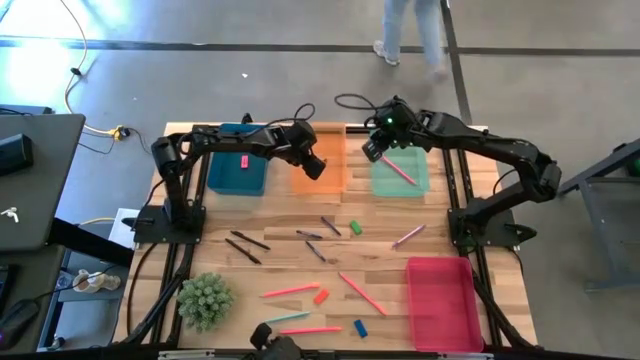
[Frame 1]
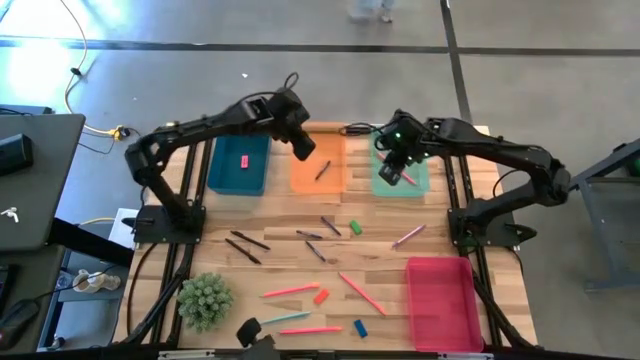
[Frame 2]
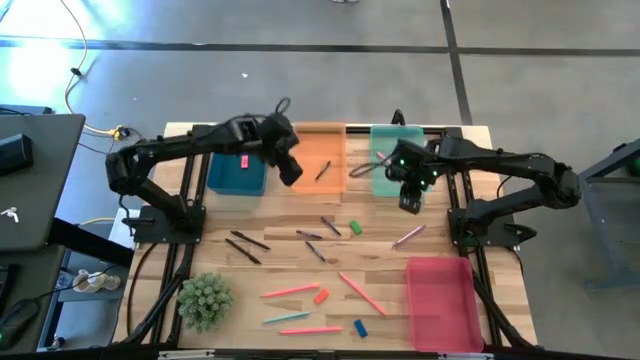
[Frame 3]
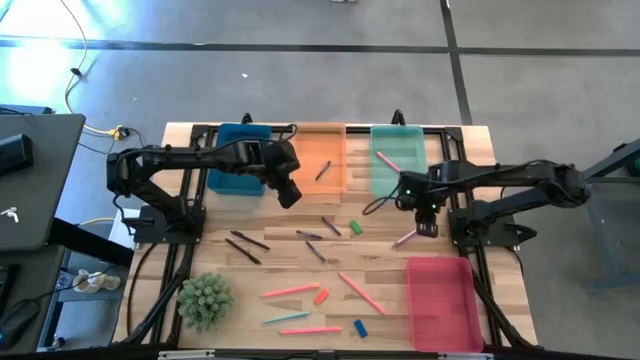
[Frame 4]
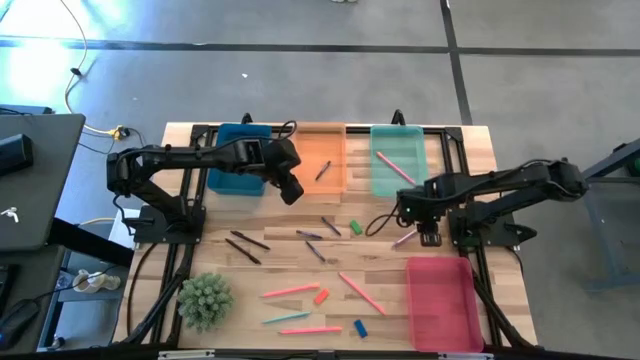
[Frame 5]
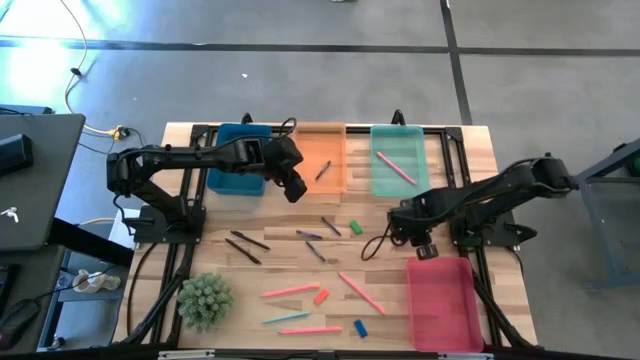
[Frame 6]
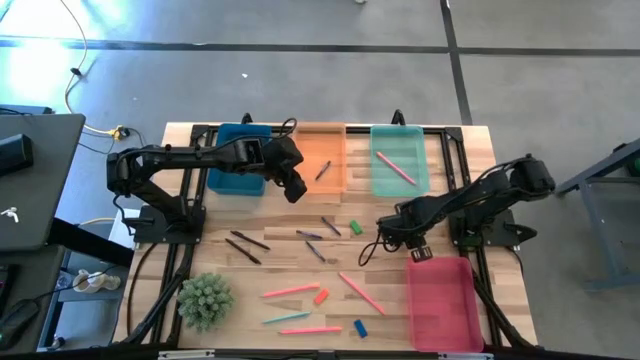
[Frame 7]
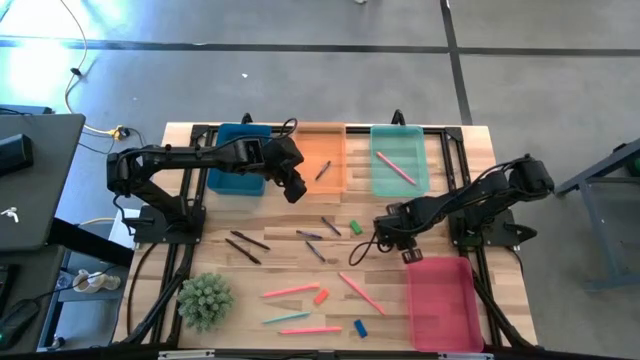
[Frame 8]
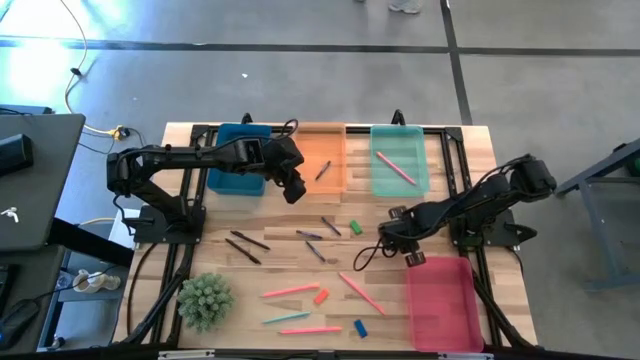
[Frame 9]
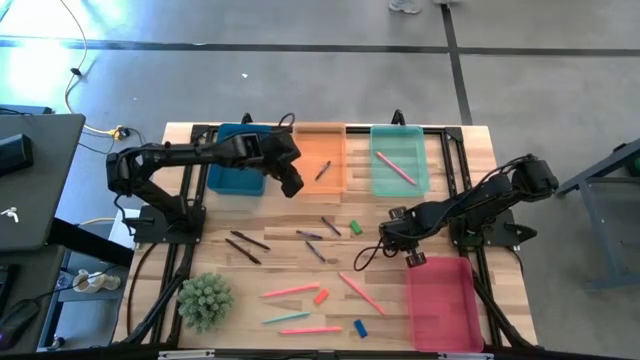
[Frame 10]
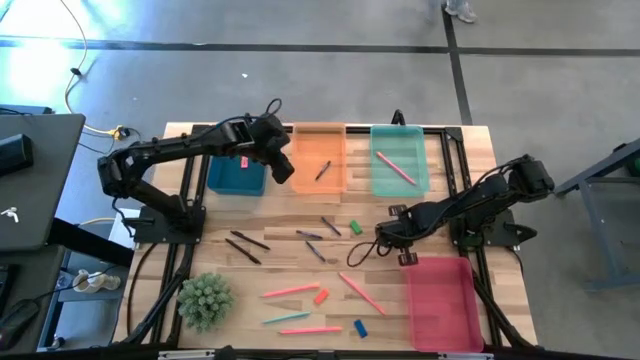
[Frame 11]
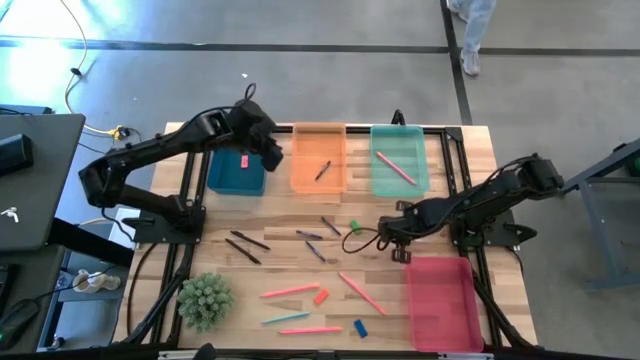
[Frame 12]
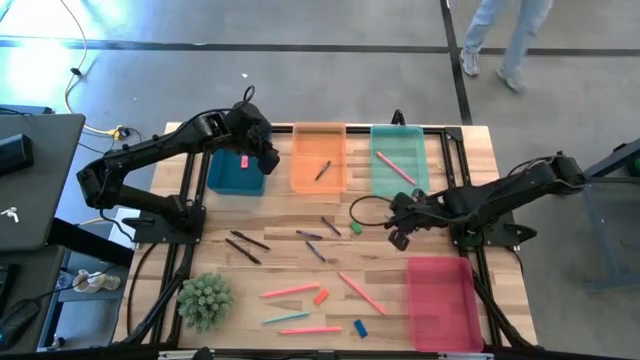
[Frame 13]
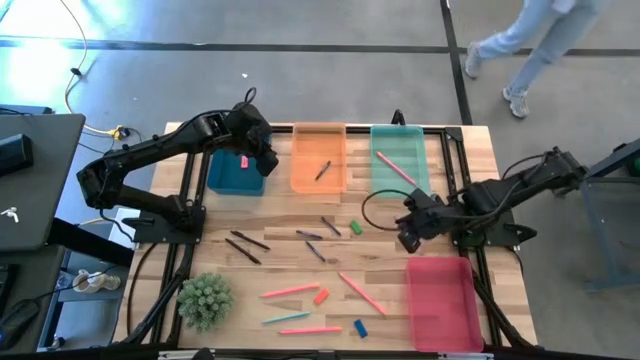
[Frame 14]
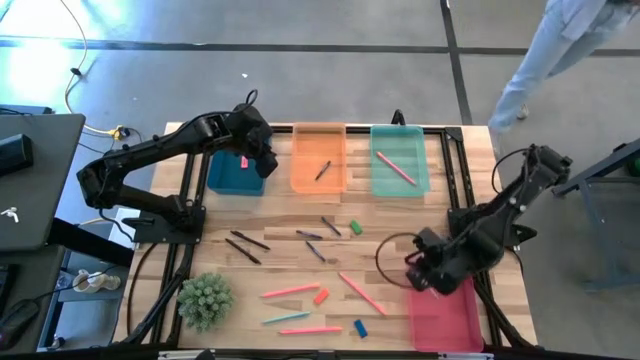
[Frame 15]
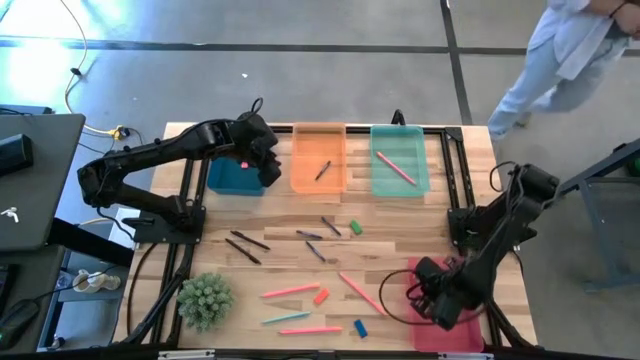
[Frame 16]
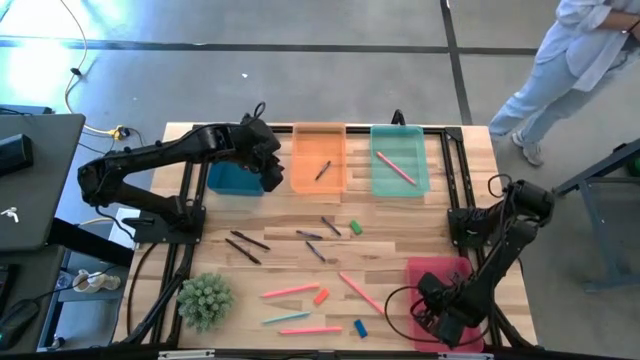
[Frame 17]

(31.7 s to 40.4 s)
Task: Sort crayons/erasers/pens/pencils in bins
Put the violet pen into the pink bin

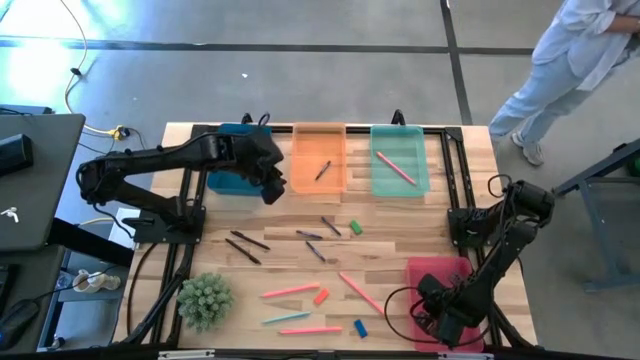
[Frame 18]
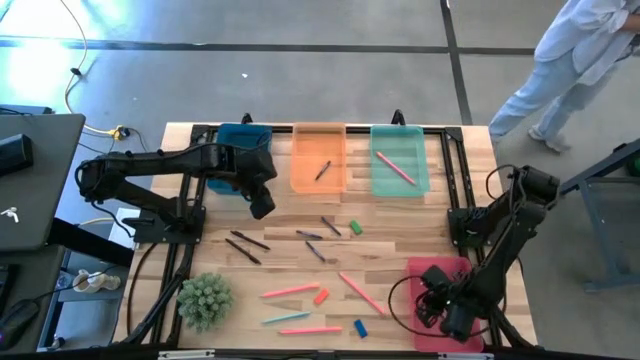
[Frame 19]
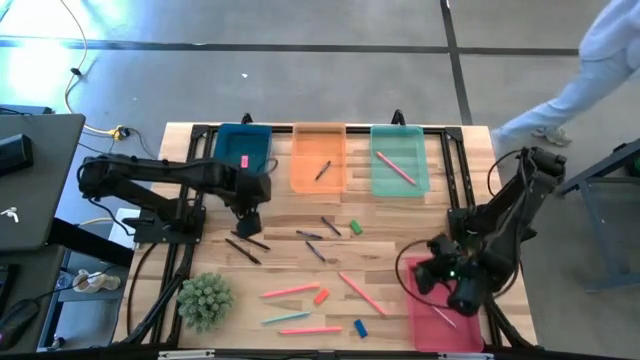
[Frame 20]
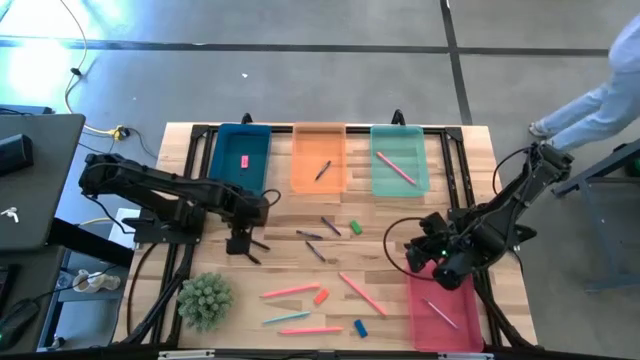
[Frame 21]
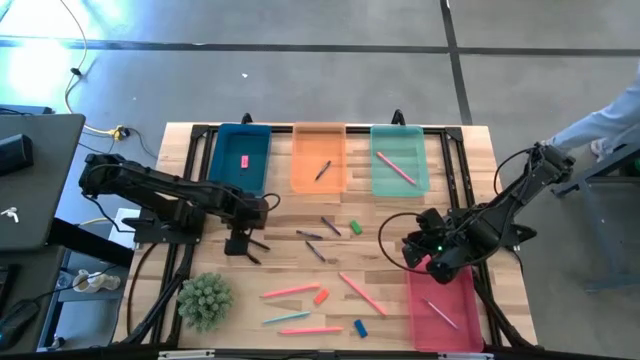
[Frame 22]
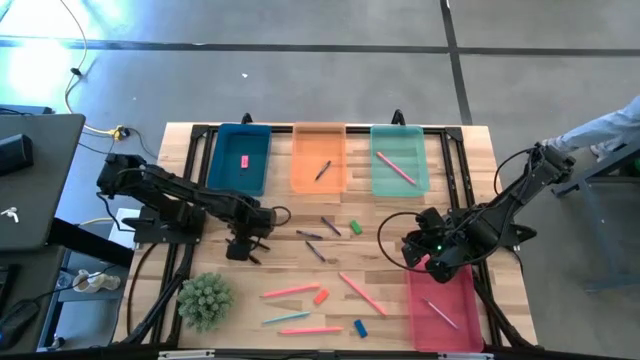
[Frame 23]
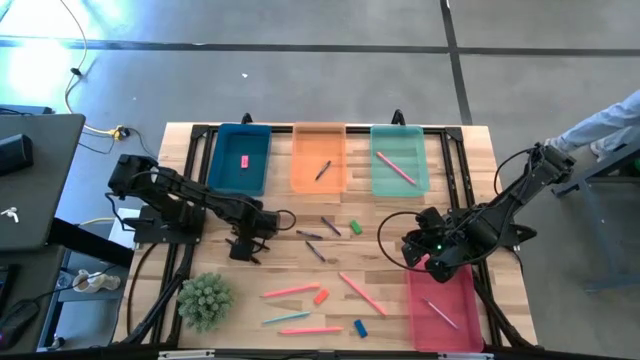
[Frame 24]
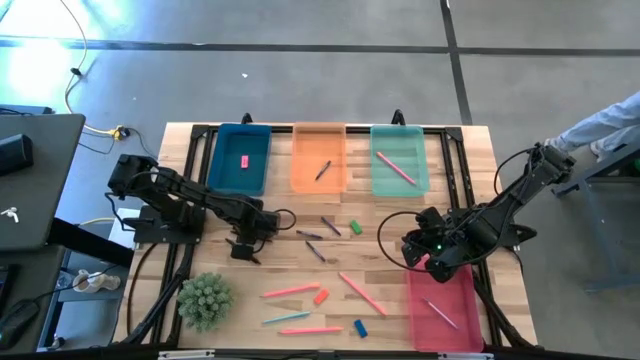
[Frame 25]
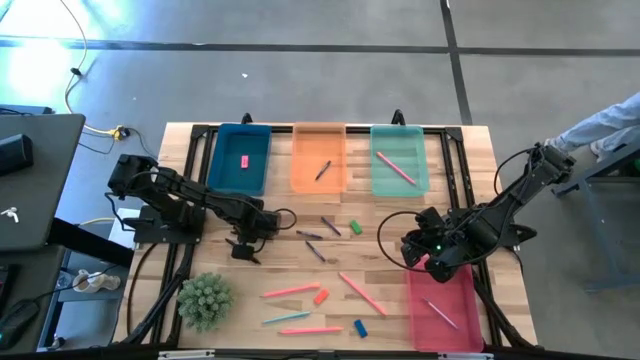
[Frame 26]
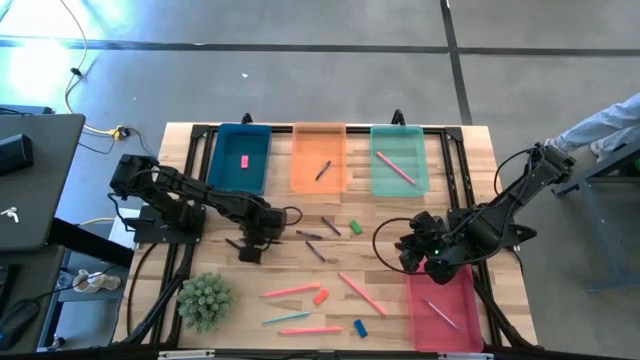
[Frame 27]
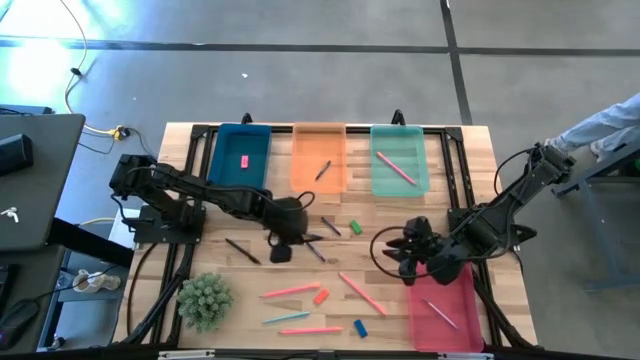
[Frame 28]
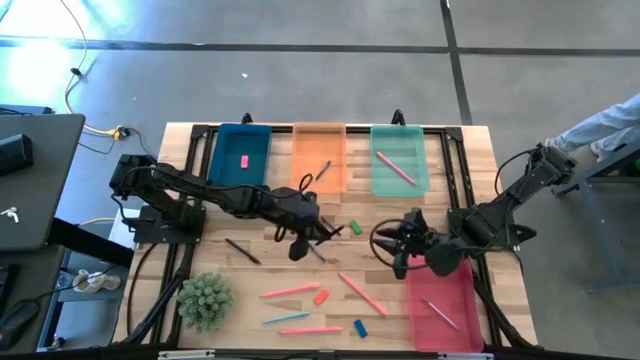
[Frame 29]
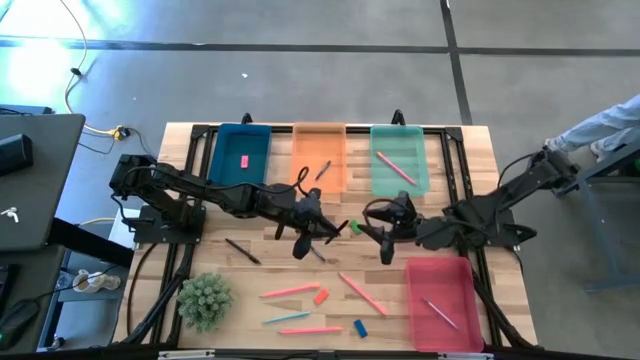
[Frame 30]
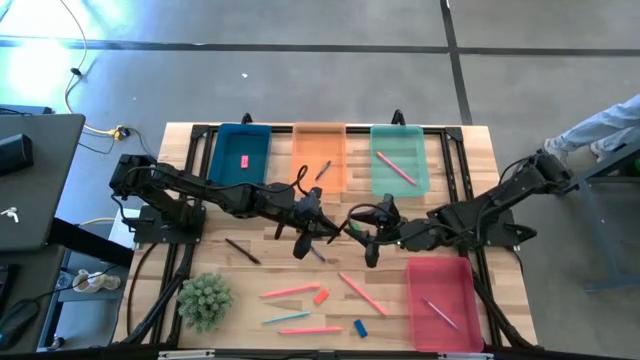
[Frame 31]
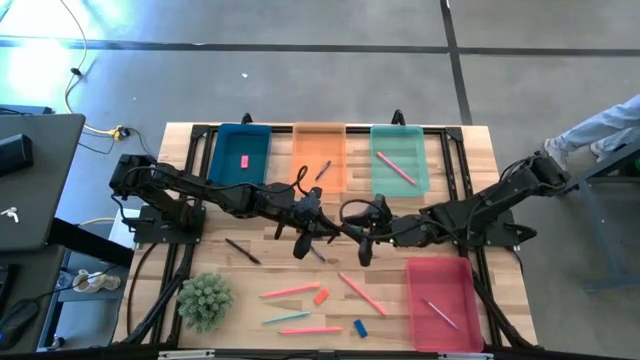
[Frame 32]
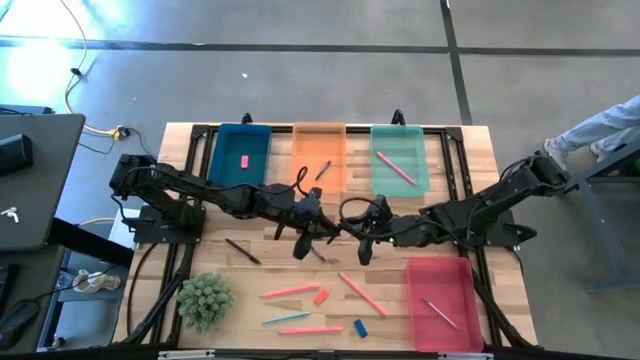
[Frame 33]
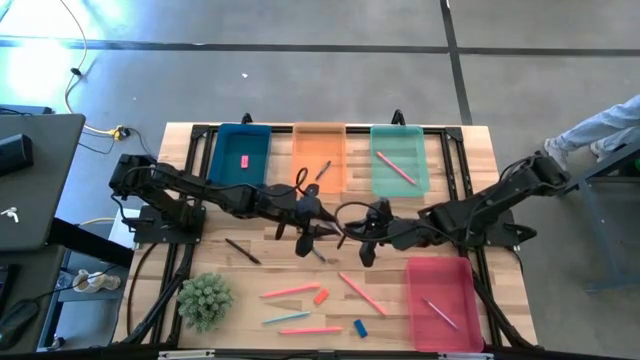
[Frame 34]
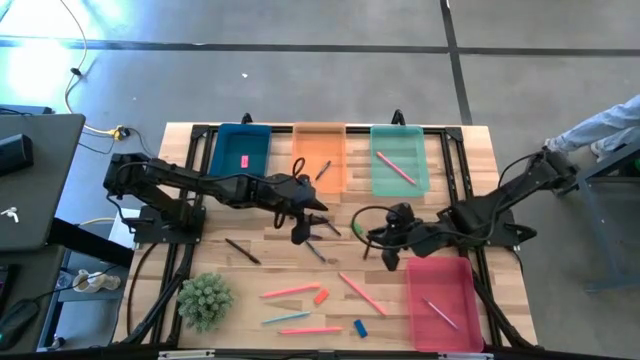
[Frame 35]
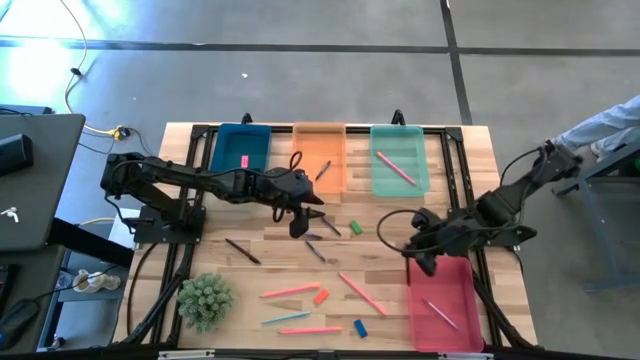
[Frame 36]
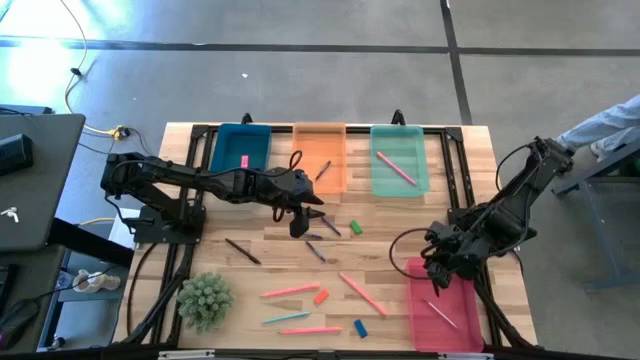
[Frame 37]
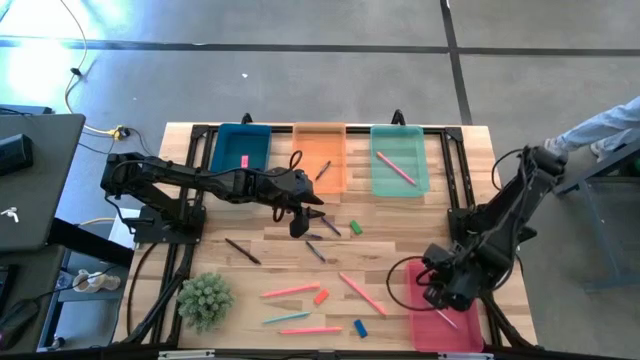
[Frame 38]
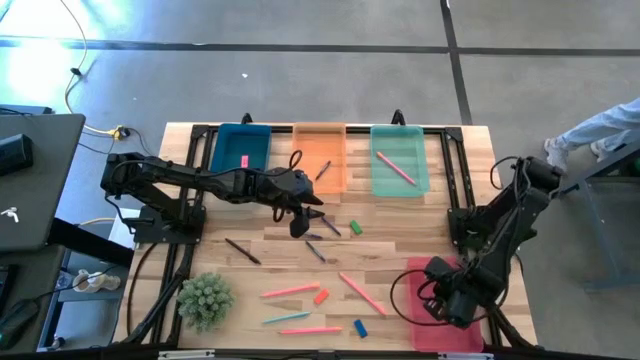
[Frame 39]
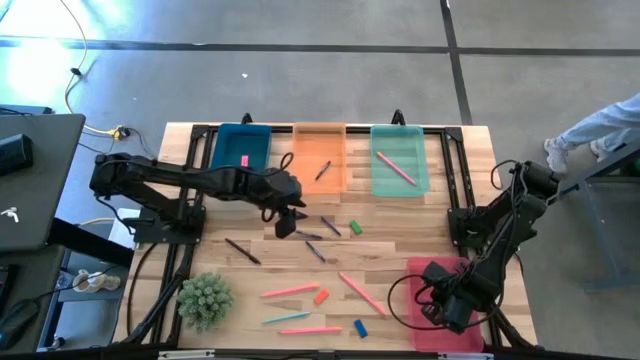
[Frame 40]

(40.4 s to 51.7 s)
Put the top black pen into the pink bin

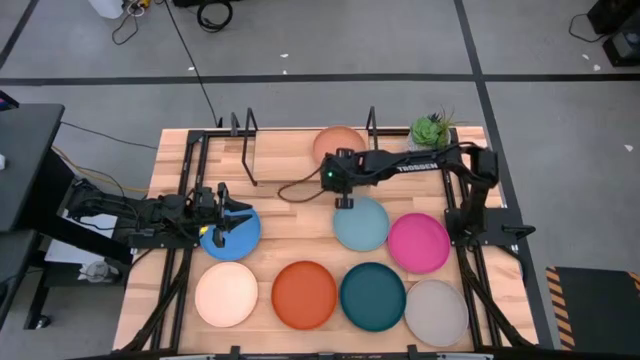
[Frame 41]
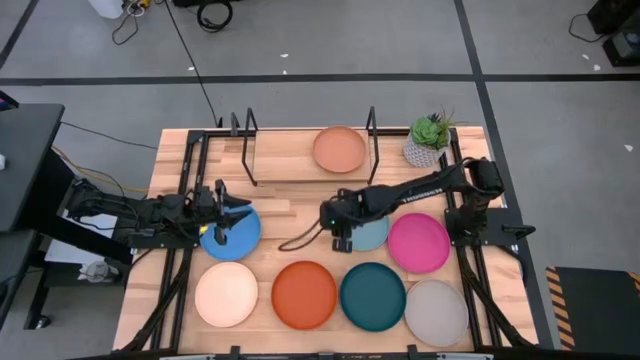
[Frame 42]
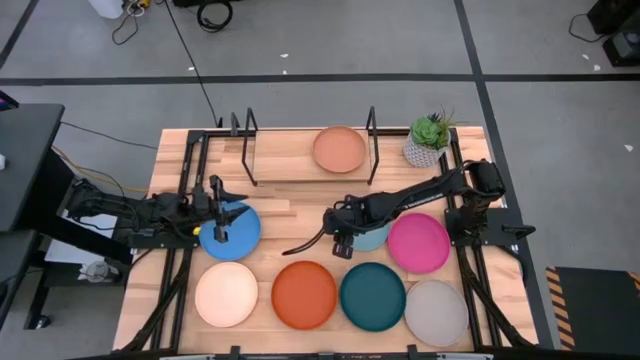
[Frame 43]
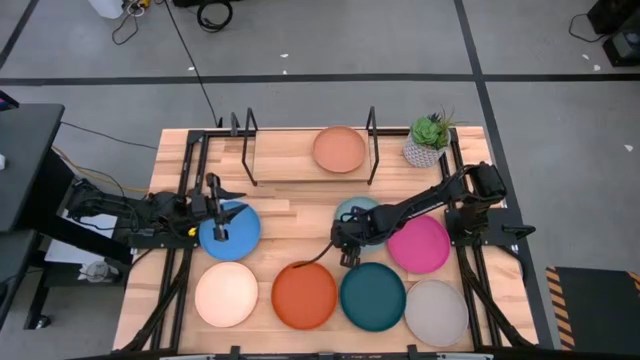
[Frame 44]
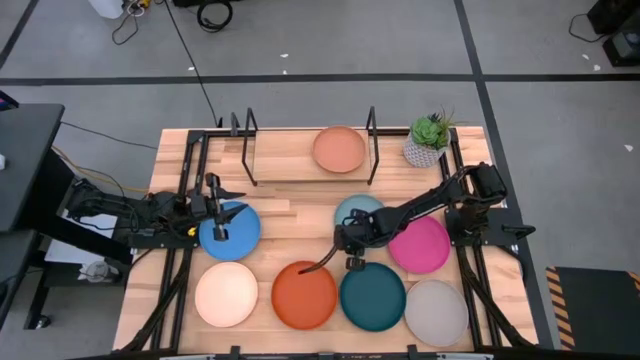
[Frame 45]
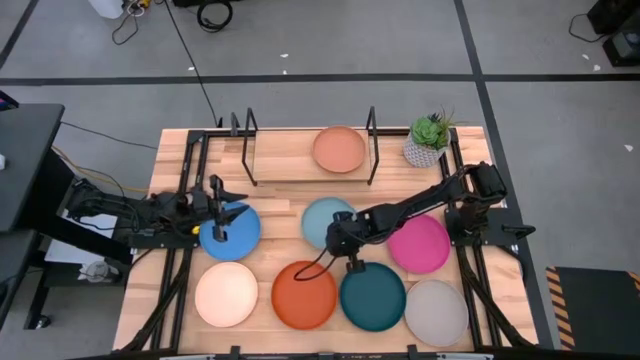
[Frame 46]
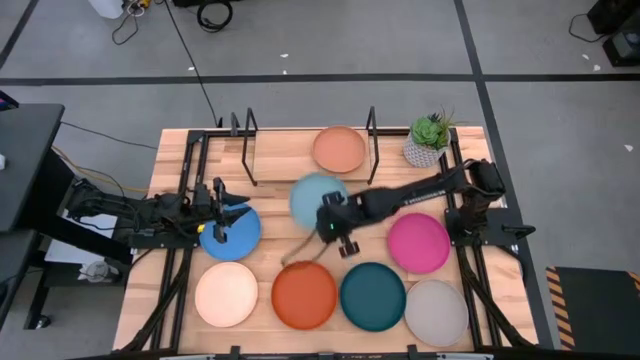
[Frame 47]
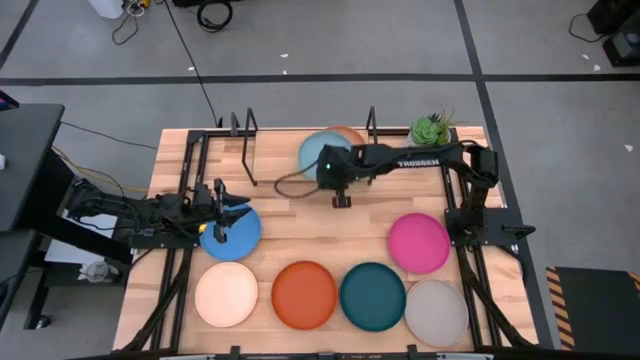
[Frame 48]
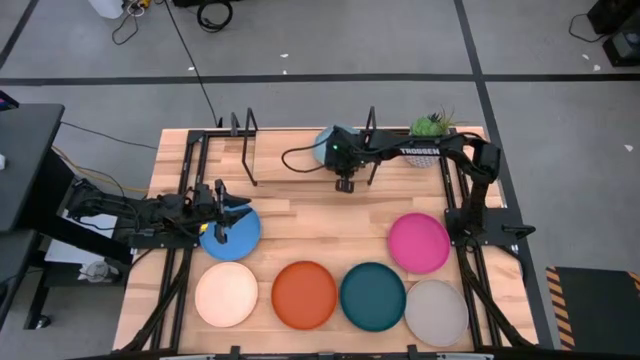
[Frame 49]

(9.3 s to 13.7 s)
Task: Place and stack plates onto a shelf
Stack the light blue plate on the top of brown plate on the shelf
